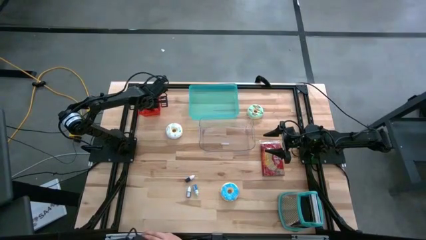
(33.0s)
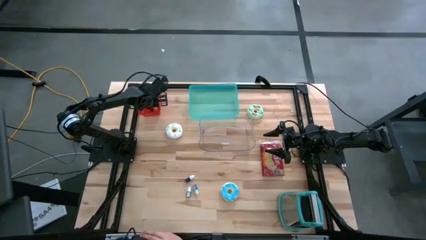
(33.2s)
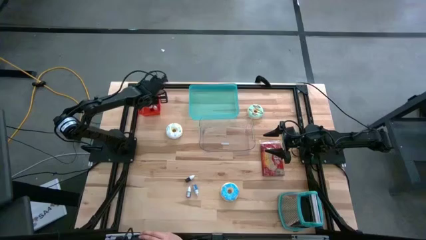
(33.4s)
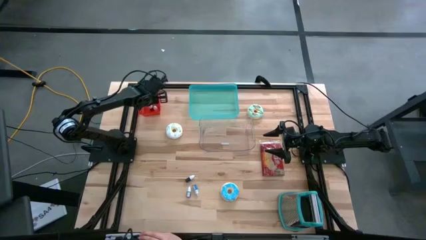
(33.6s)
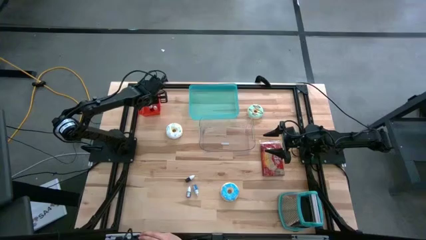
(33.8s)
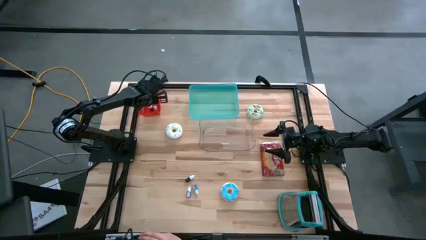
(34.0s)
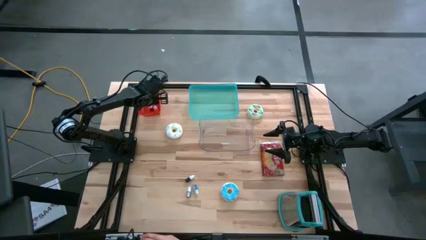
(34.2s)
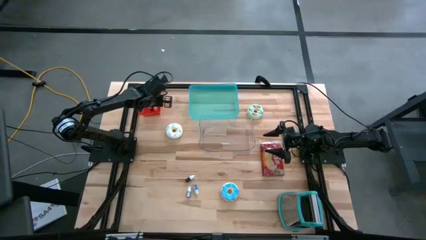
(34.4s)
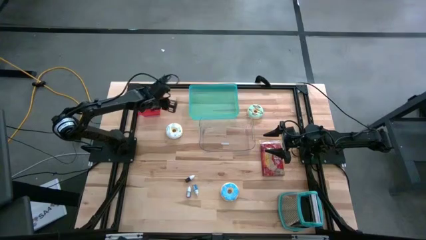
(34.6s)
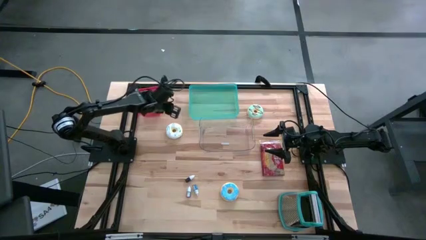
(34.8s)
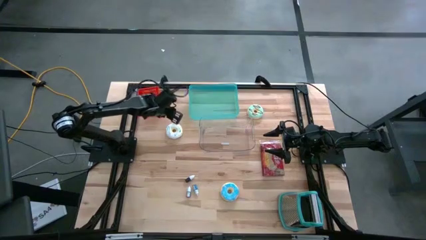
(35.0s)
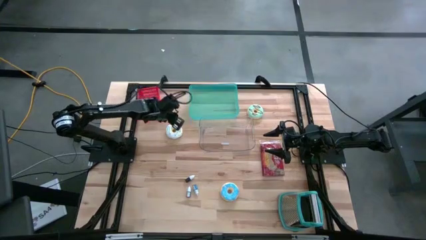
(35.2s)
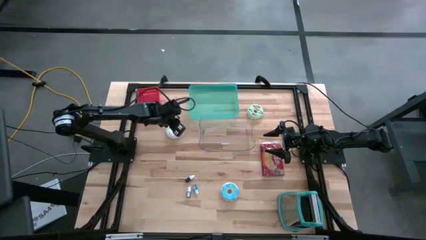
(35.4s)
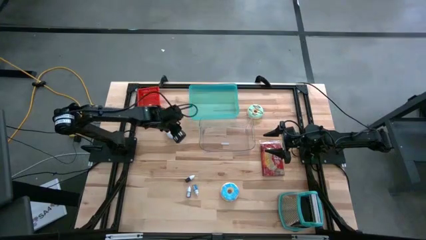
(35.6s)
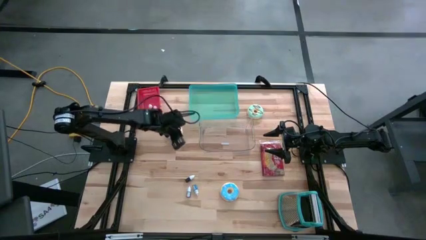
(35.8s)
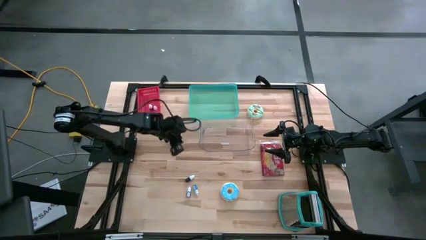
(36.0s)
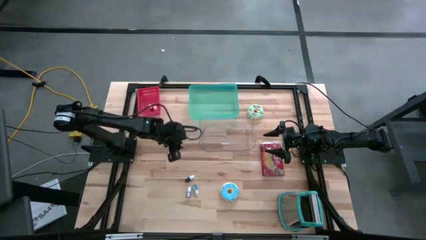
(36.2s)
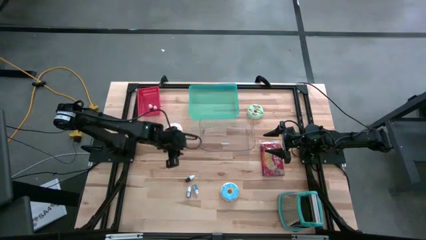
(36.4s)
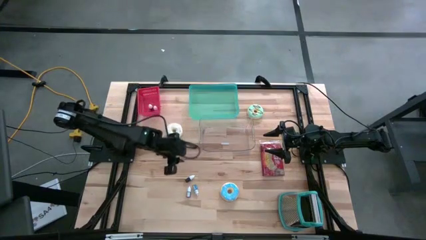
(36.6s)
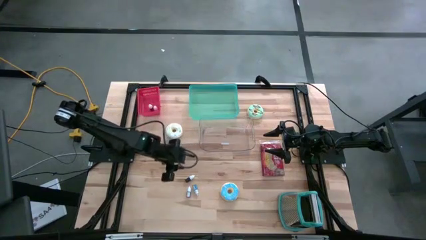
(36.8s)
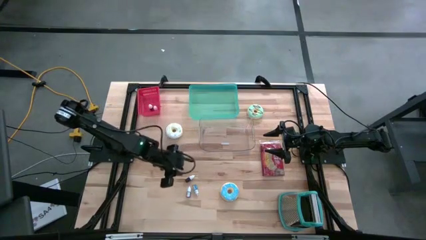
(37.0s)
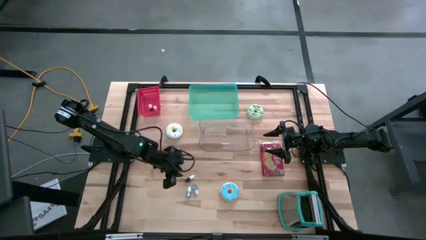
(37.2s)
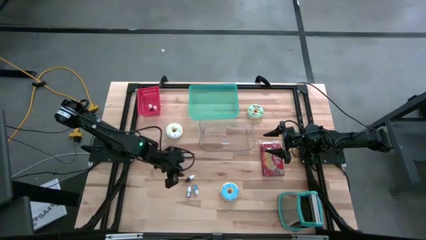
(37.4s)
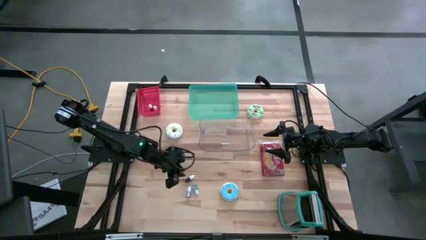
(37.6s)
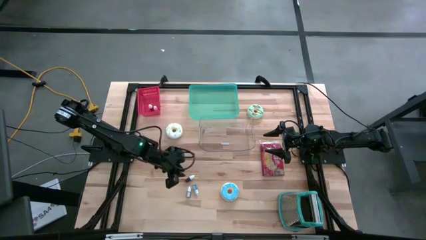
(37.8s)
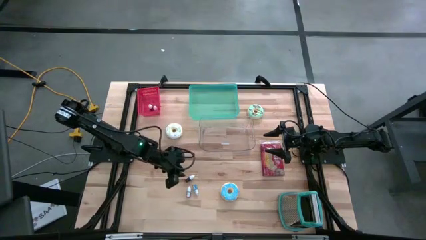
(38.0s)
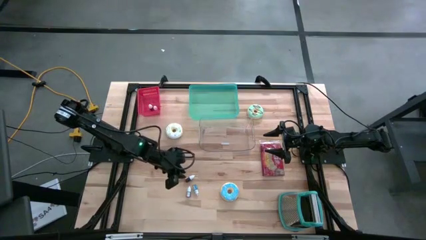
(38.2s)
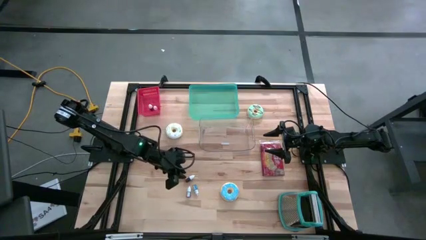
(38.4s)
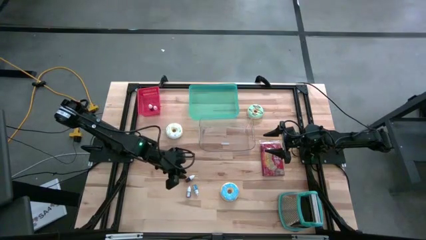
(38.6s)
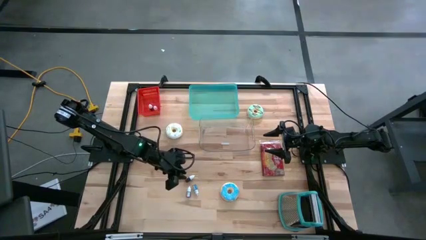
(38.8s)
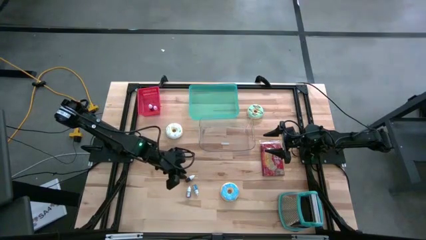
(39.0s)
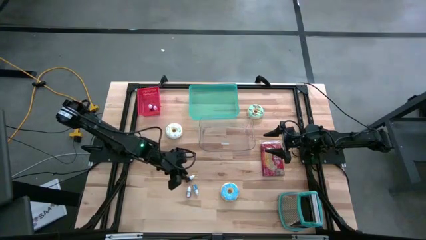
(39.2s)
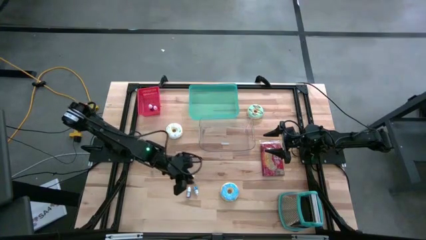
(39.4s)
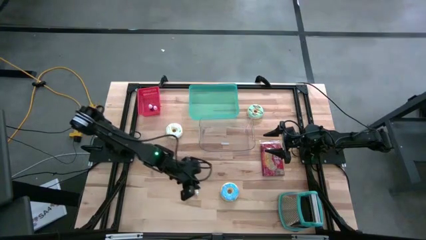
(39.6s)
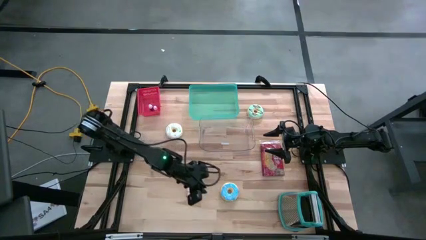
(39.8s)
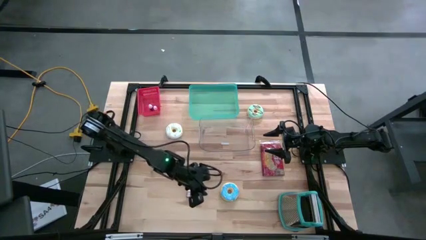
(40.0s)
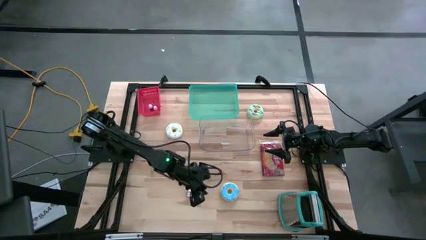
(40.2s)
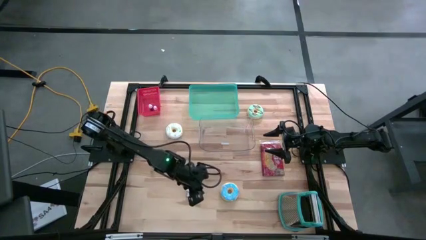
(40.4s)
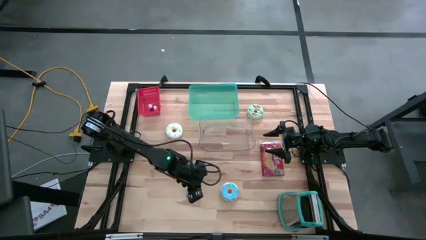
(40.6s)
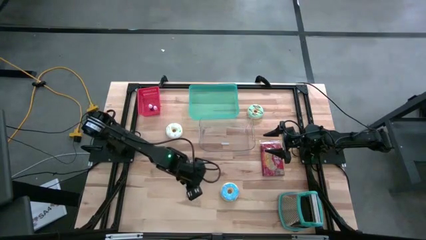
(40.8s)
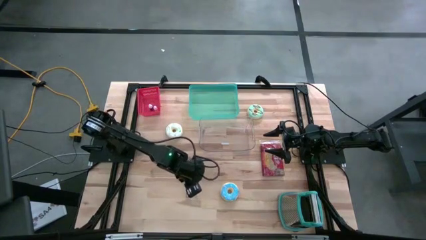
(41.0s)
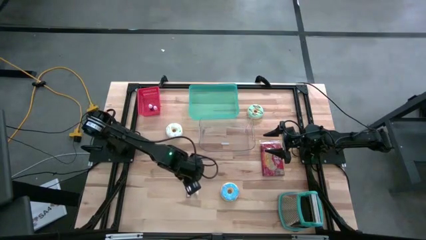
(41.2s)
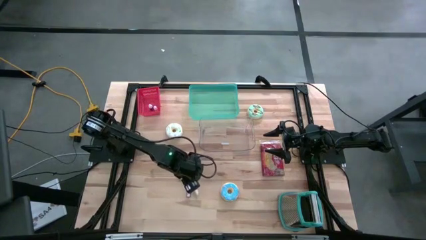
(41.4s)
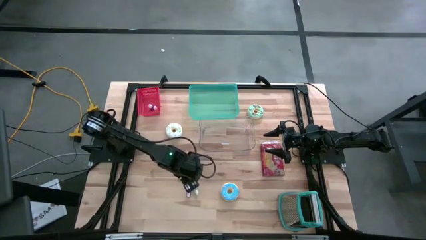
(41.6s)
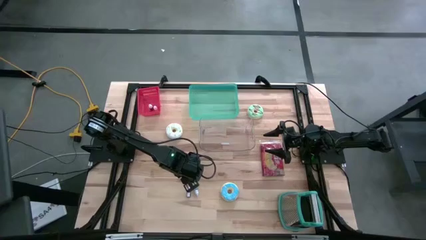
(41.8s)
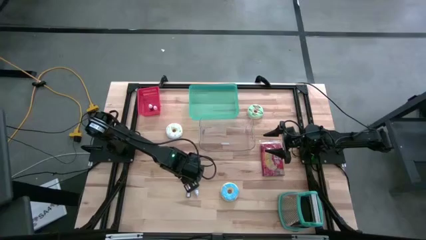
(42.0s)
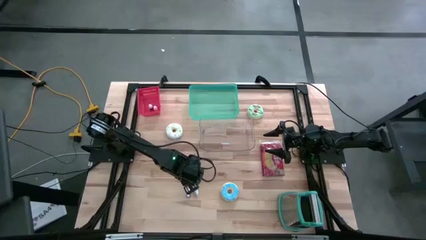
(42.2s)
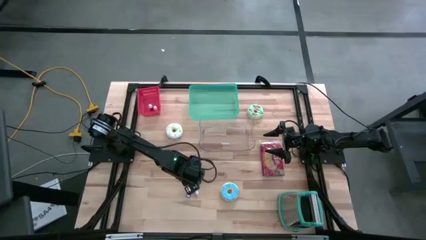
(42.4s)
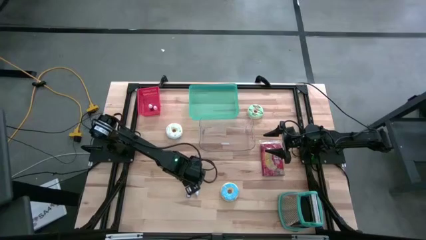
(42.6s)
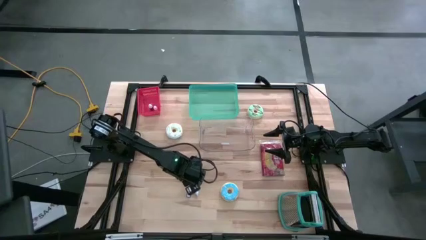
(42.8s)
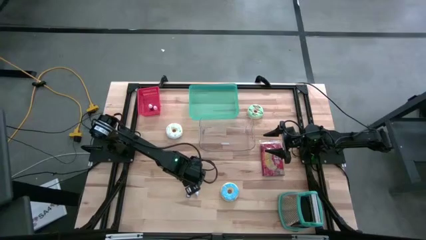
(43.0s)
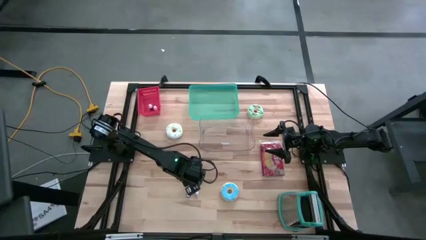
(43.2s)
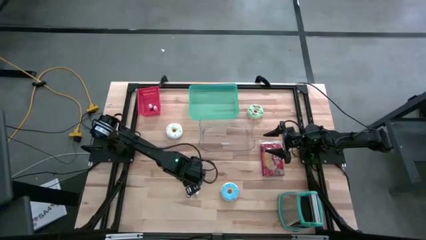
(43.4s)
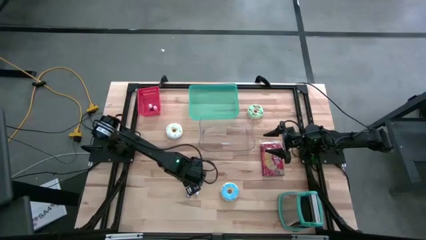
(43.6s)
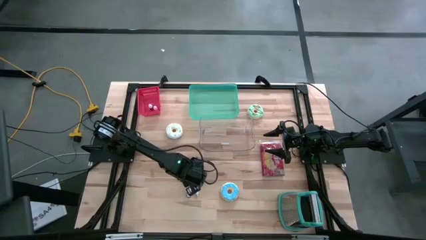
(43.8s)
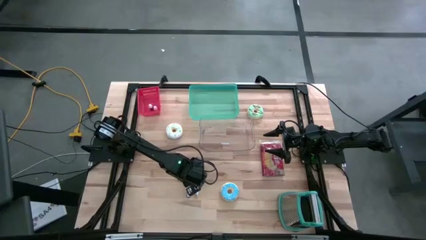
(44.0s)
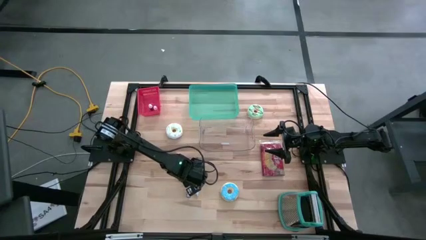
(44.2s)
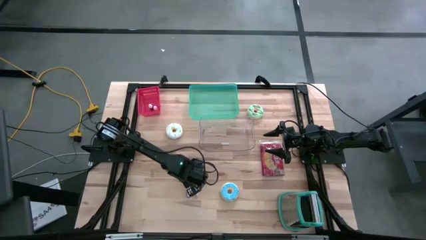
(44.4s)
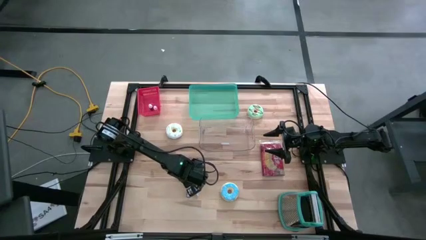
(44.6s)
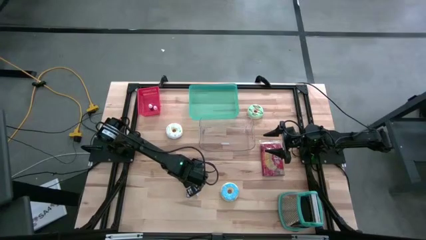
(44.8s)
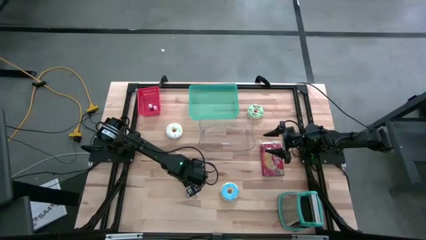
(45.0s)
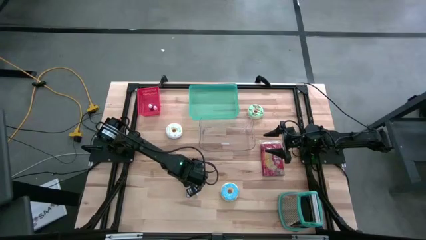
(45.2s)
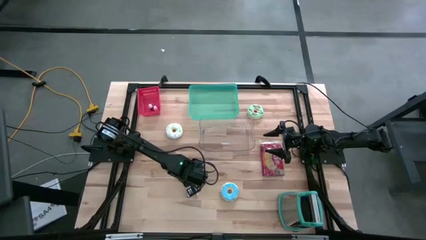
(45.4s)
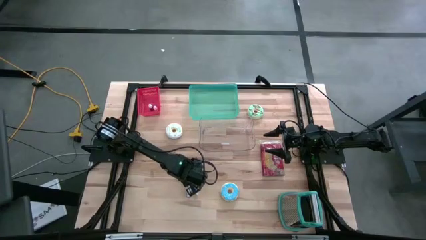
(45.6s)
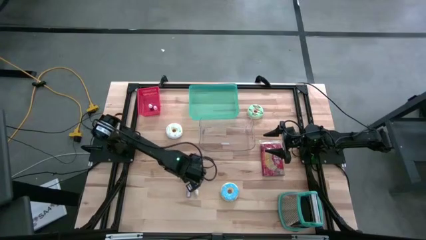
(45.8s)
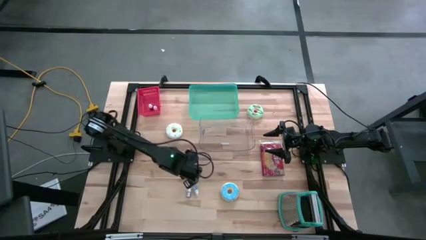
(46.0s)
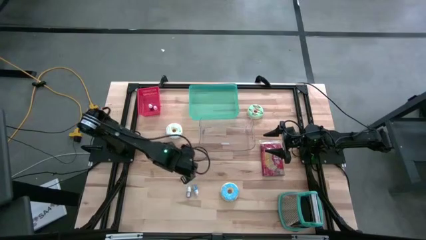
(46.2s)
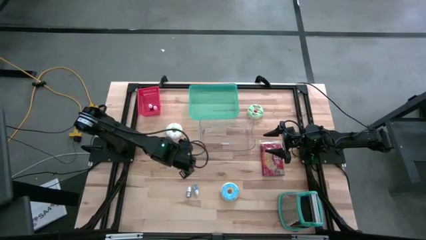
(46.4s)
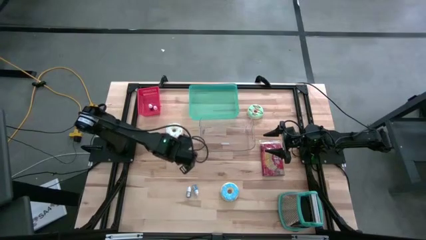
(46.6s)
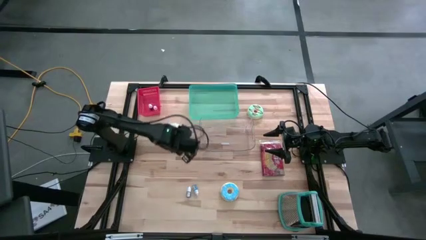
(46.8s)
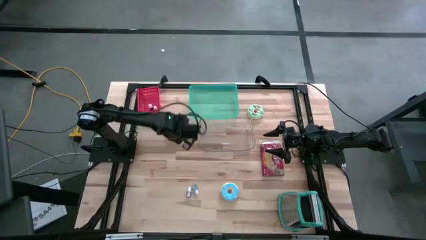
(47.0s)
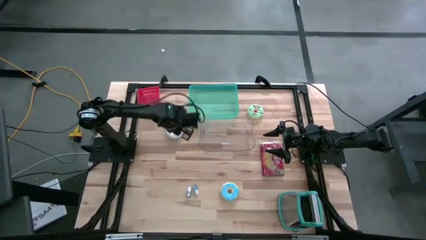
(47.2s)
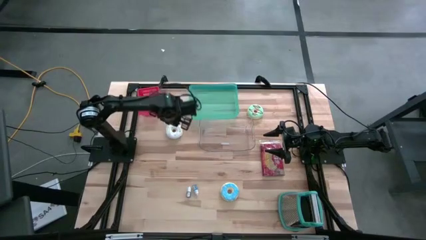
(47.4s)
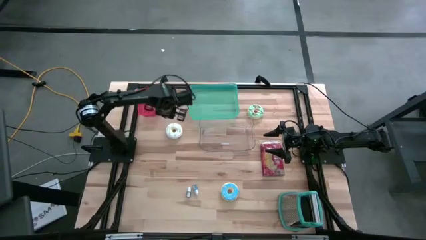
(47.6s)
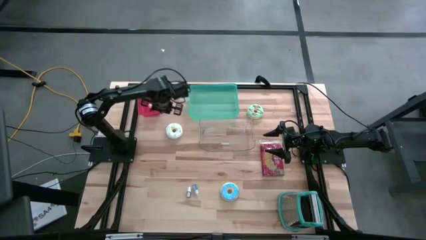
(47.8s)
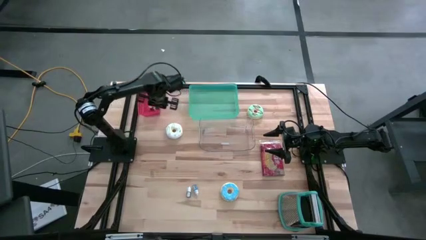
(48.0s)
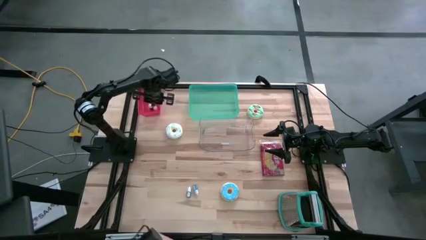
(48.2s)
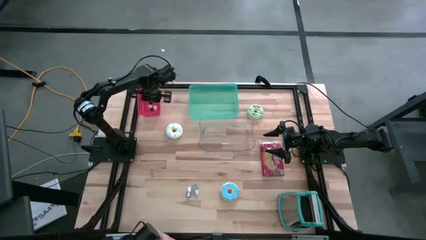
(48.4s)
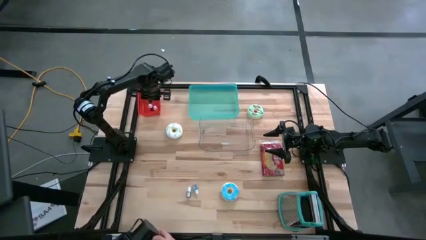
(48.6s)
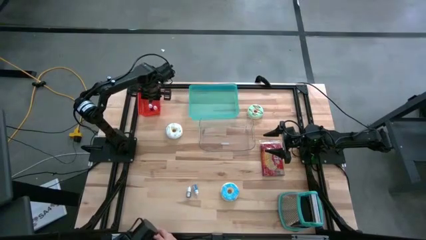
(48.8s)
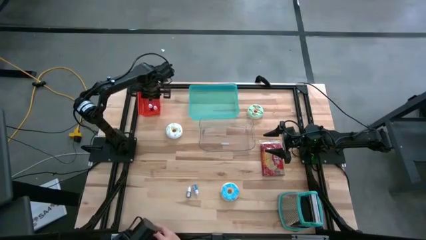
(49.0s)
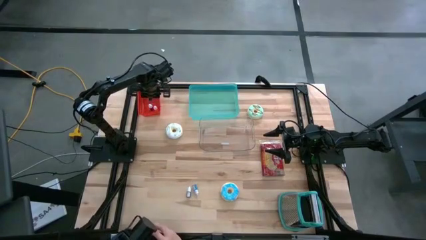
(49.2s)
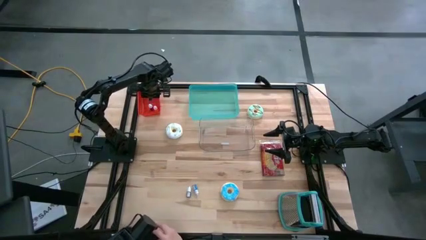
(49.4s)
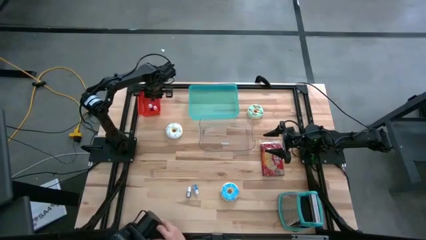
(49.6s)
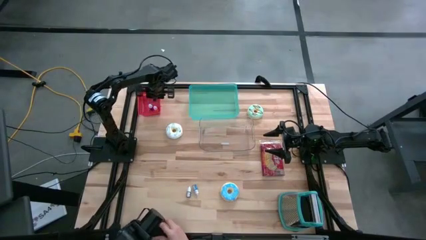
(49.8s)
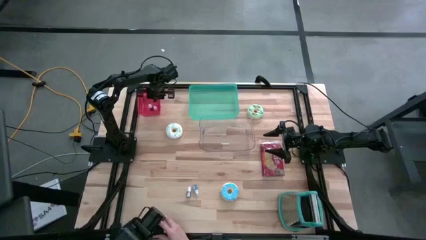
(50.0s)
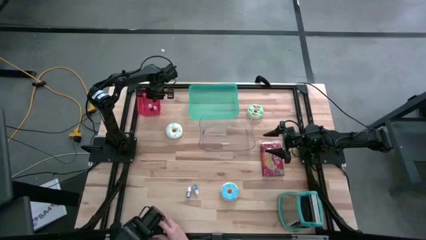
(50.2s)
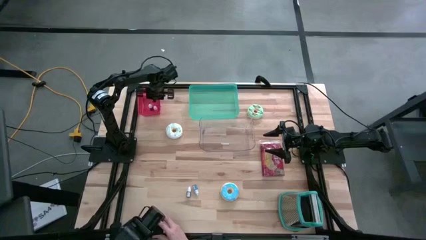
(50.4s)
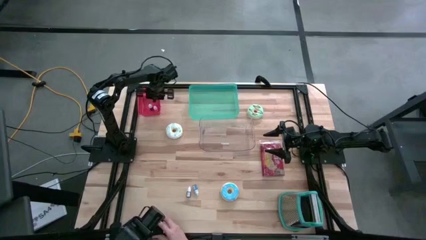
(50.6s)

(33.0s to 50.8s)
Put the top red food coloring bottle into the red bin
